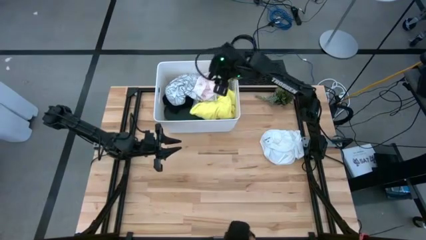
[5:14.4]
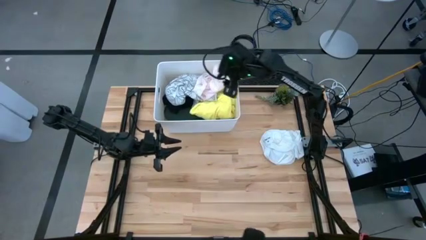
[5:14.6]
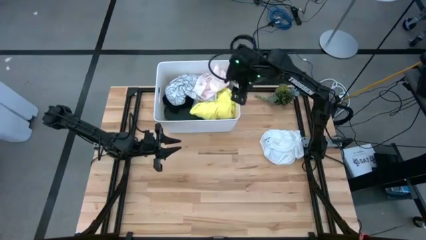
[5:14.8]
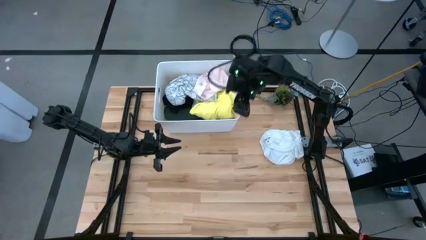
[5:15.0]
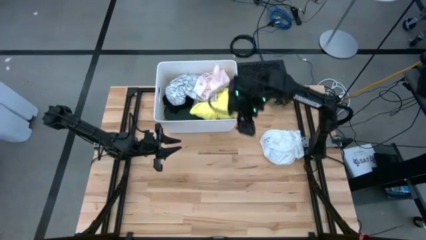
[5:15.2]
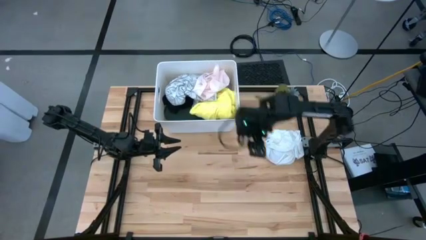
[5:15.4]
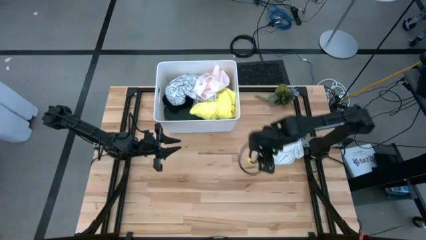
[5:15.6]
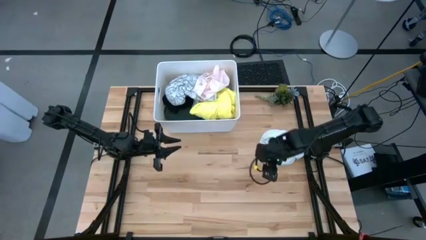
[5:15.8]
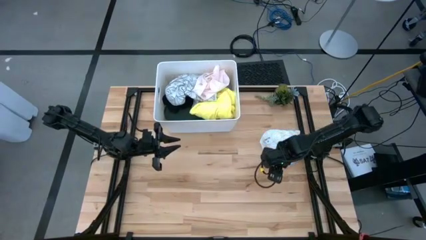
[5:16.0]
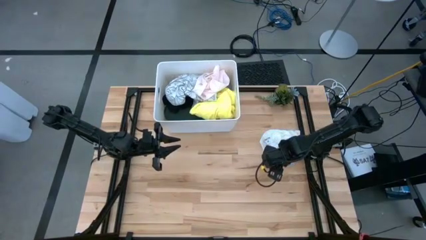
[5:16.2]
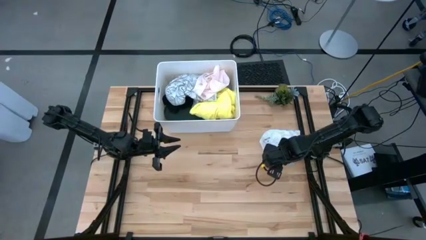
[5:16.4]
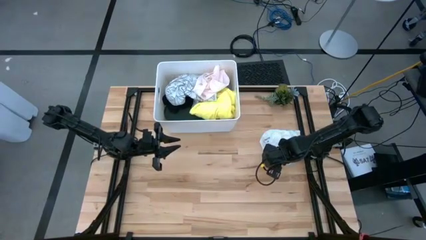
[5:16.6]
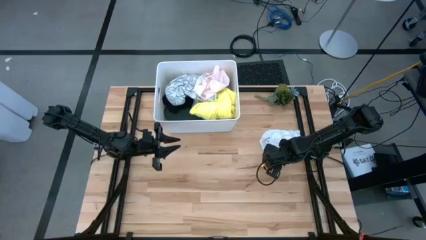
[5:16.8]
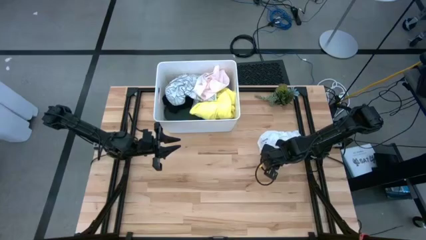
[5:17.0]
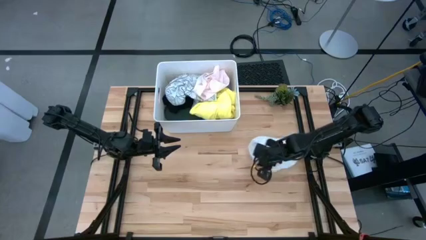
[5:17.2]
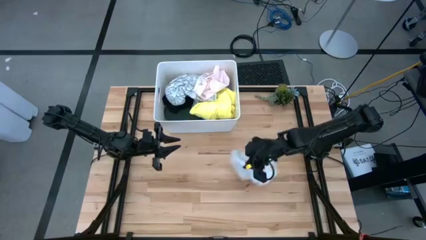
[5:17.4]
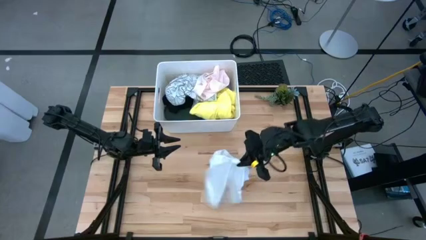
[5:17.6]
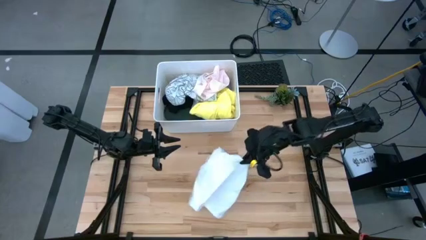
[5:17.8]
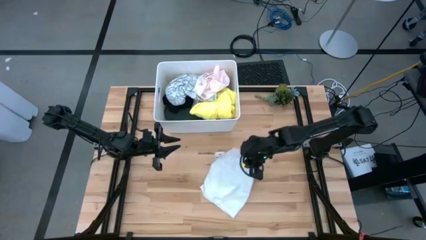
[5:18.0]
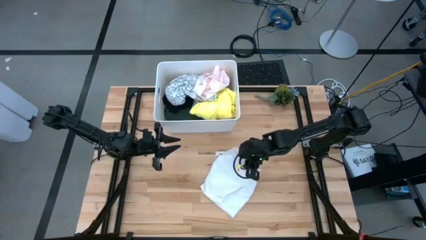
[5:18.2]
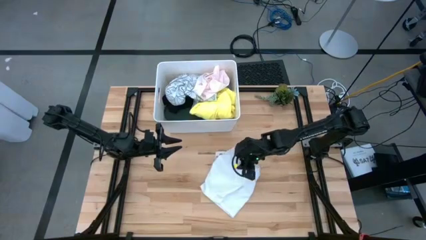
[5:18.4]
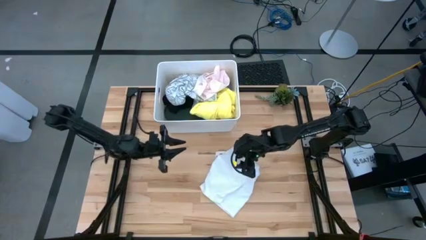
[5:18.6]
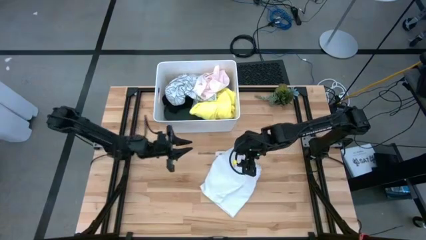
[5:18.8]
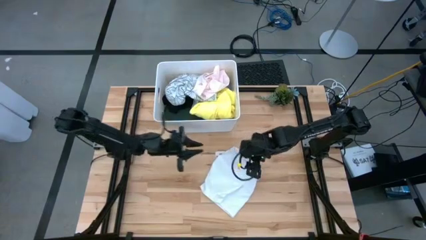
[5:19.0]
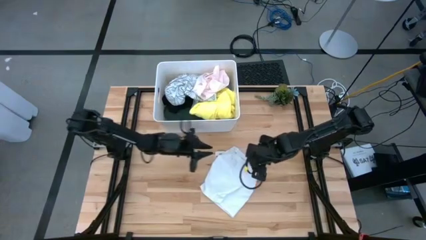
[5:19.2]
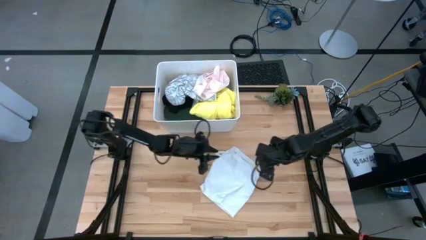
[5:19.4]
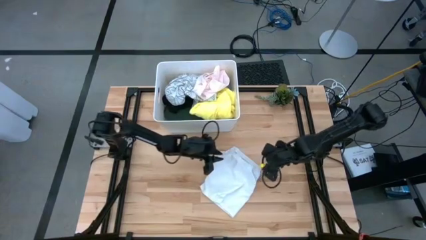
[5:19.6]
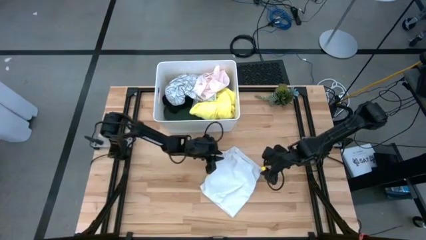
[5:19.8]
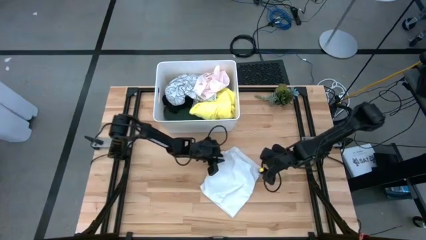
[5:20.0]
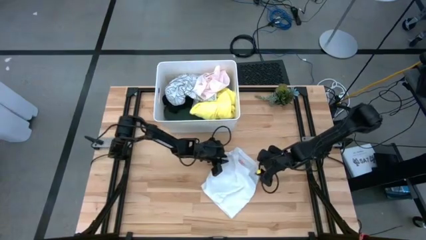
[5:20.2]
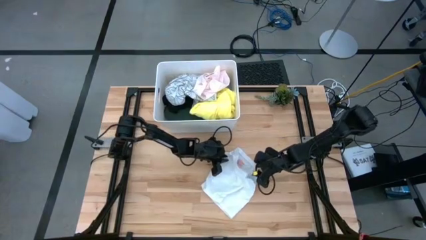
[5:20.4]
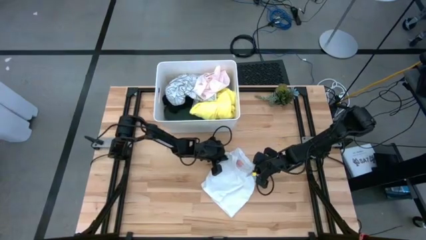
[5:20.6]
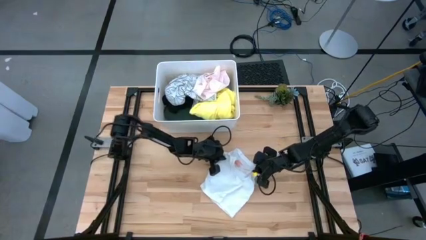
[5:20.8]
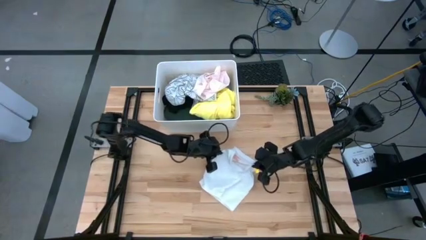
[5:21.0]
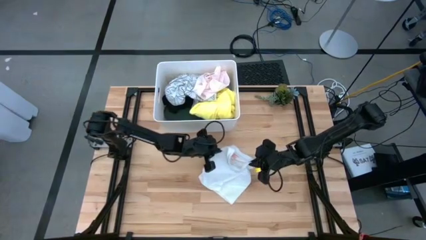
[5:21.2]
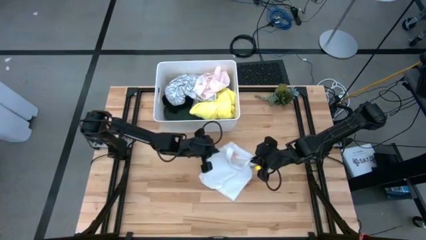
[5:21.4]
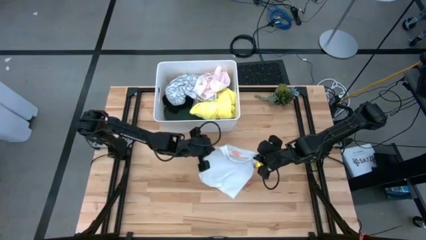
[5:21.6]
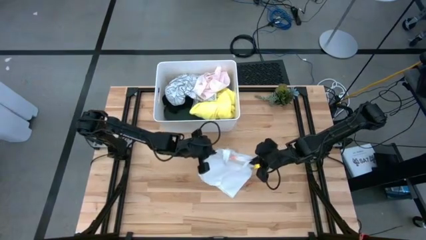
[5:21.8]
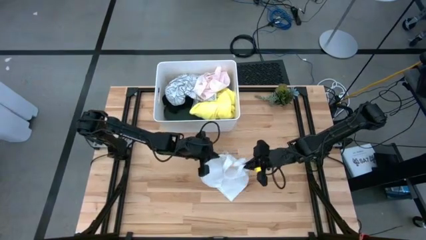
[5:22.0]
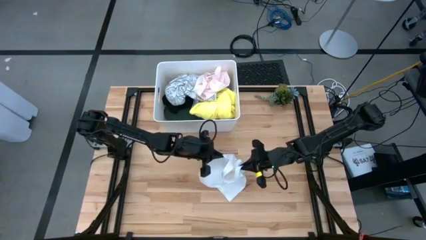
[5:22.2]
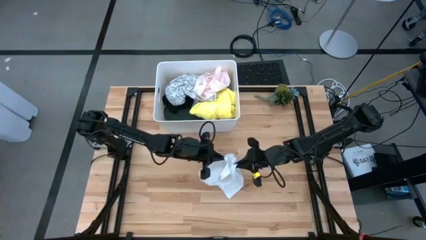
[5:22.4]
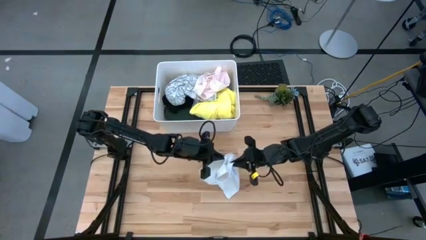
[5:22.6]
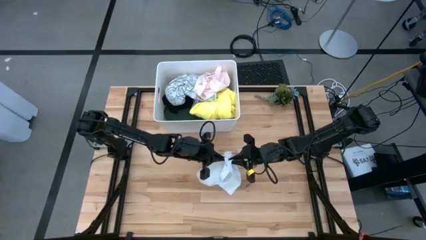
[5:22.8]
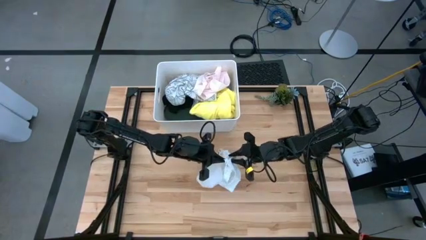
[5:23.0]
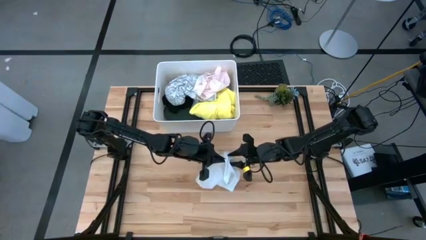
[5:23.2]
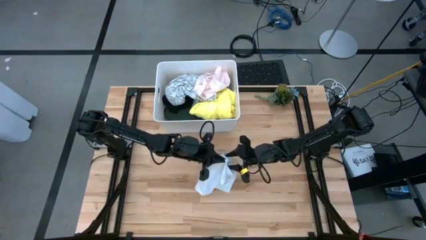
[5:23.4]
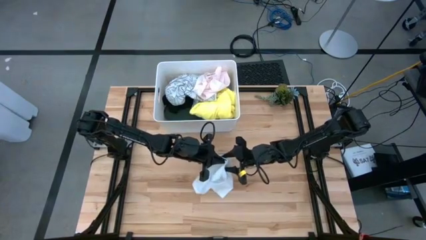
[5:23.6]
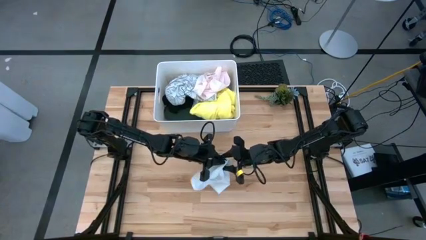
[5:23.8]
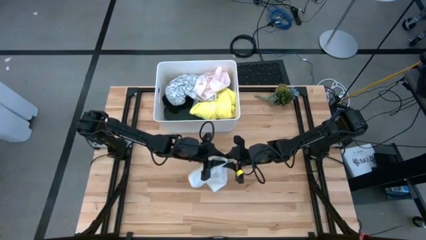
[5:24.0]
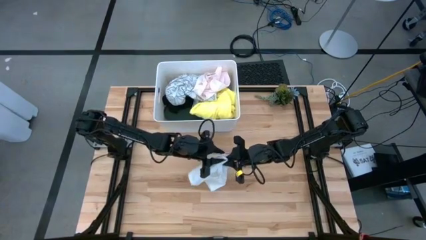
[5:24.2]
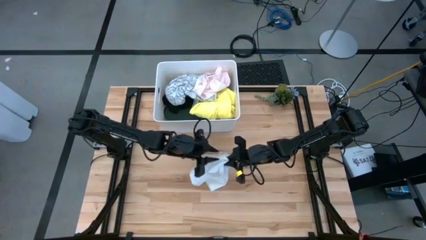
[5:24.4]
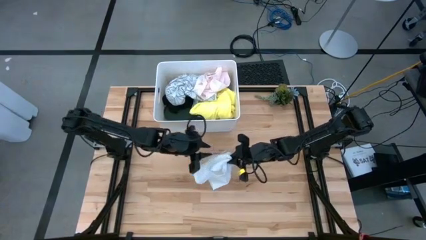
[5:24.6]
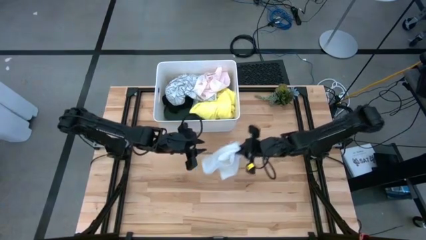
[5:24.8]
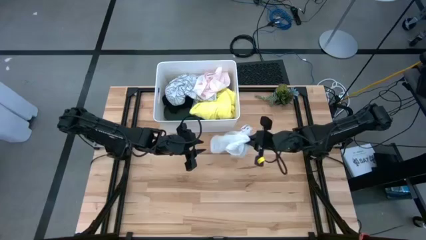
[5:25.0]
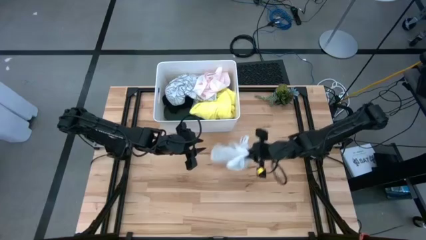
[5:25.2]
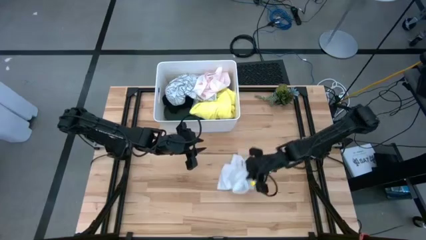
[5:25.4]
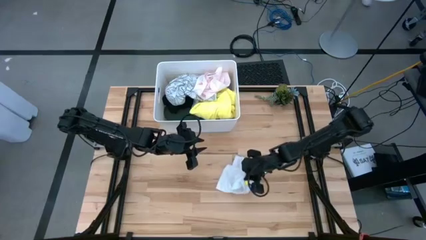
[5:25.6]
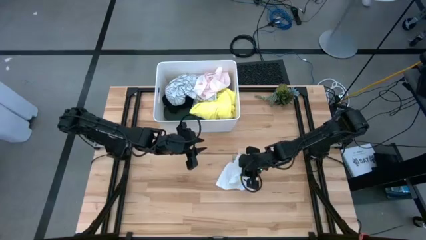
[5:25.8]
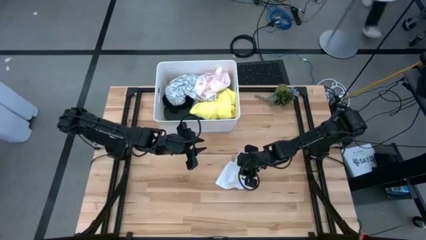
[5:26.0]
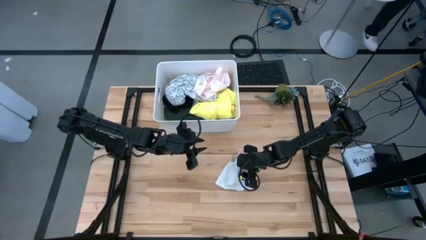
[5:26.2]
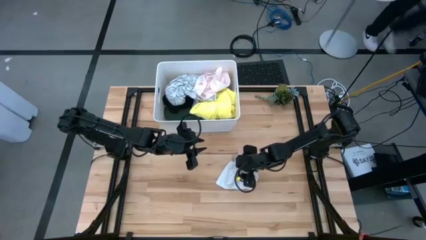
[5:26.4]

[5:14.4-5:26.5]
Task: Fold laundry
Fold the white underwear

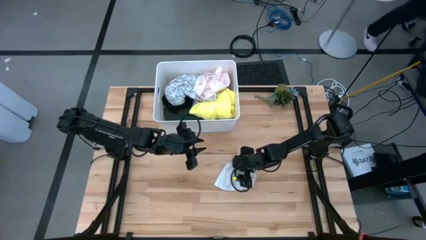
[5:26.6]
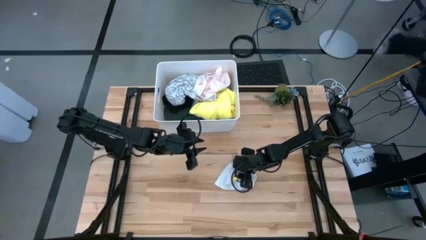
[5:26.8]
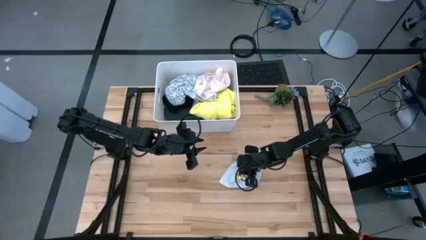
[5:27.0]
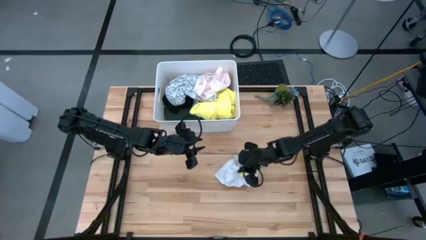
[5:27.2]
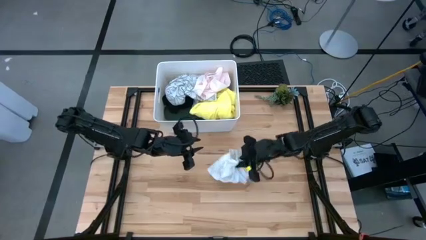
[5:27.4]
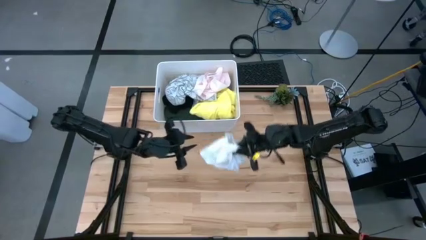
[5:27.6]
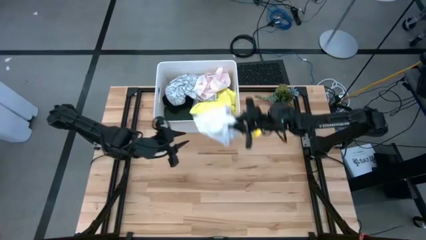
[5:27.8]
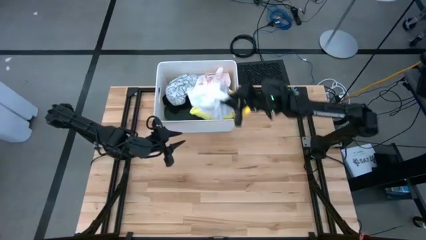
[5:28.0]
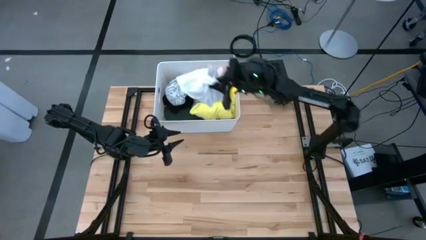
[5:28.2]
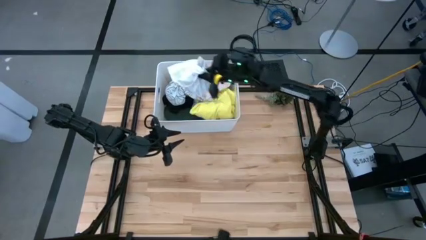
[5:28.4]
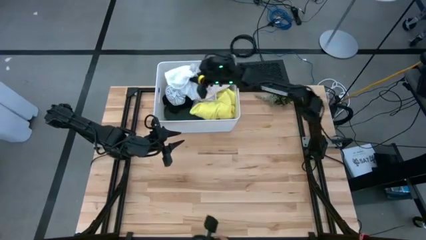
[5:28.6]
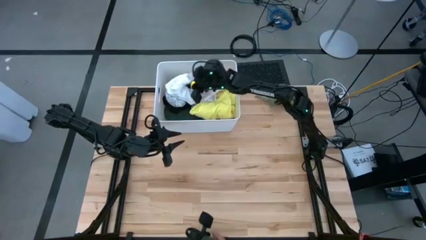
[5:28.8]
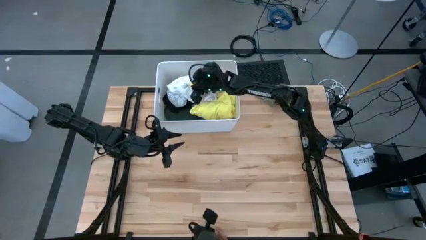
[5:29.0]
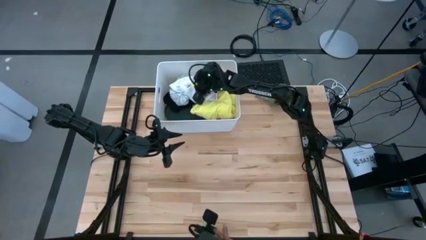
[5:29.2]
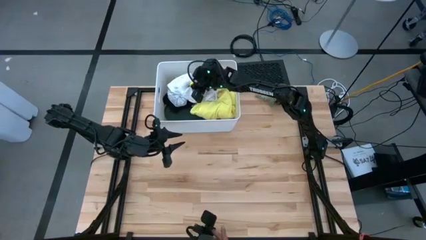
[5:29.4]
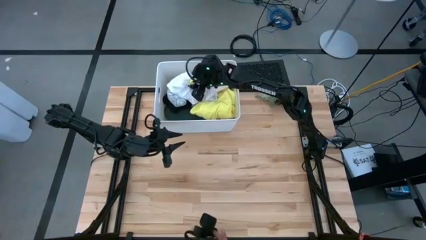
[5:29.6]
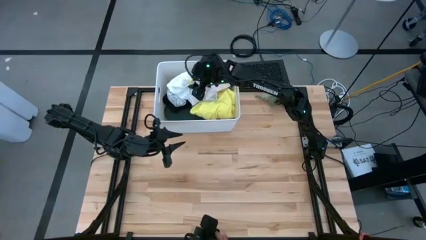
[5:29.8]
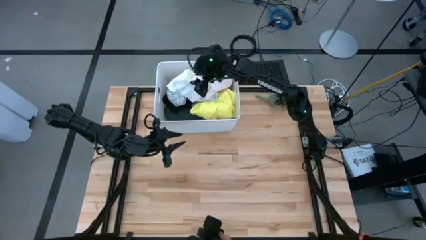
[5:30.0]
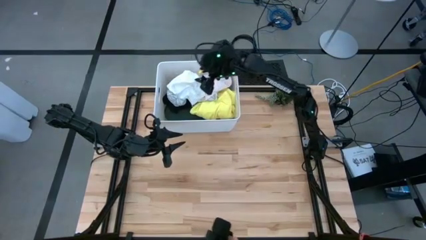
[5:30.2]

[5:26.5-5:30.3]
Put the folded white underwear into the white laundry bin
